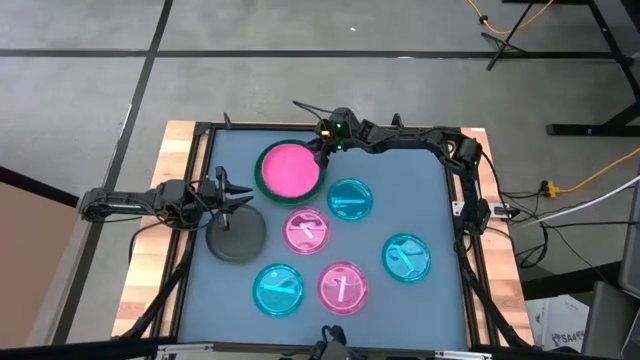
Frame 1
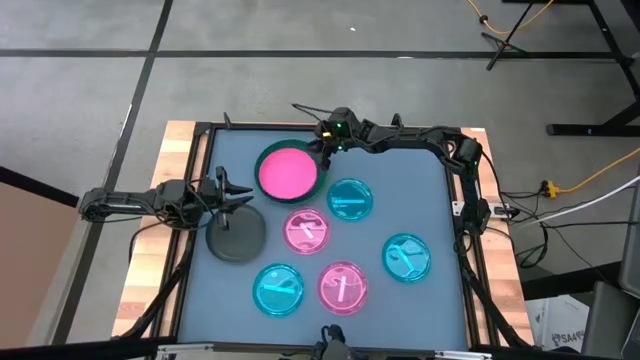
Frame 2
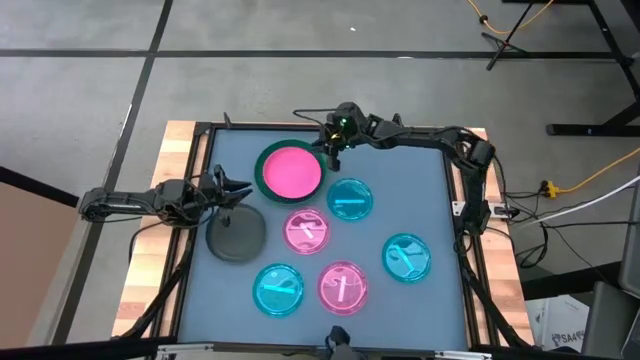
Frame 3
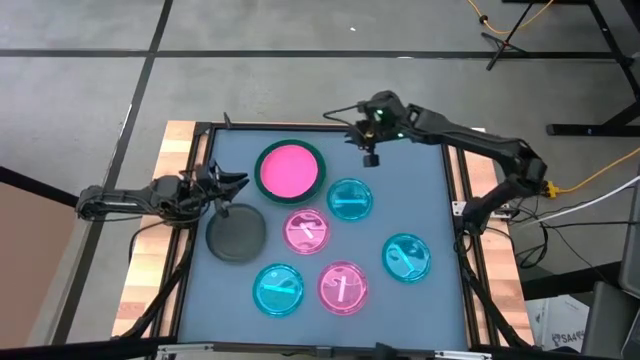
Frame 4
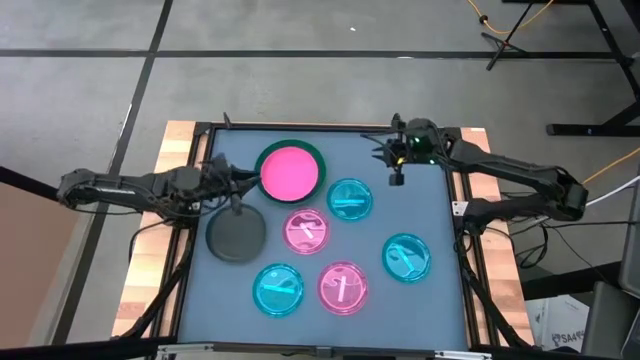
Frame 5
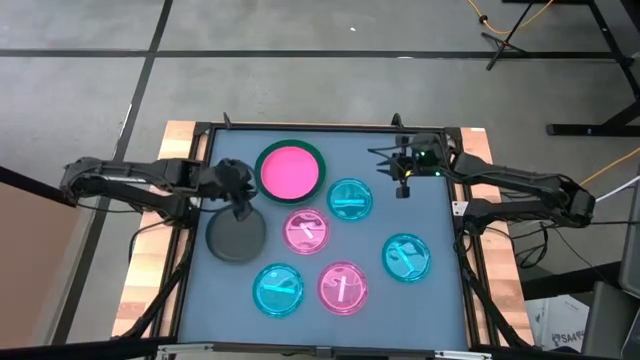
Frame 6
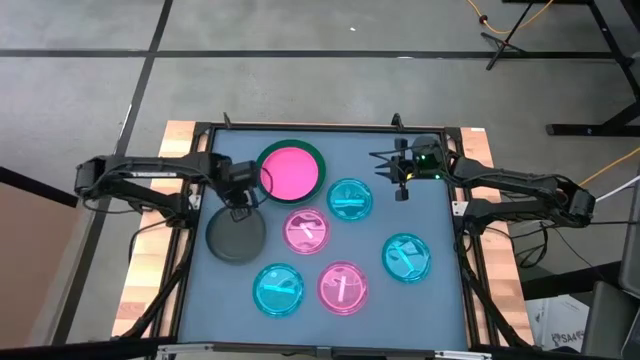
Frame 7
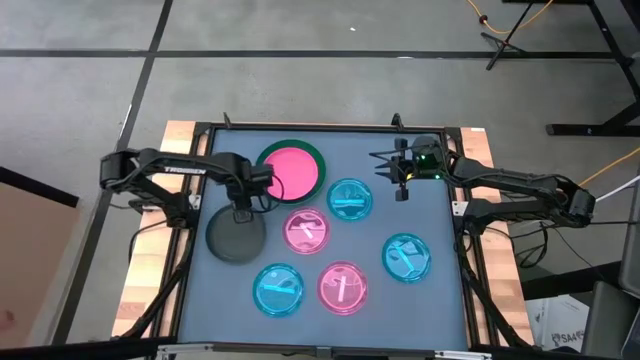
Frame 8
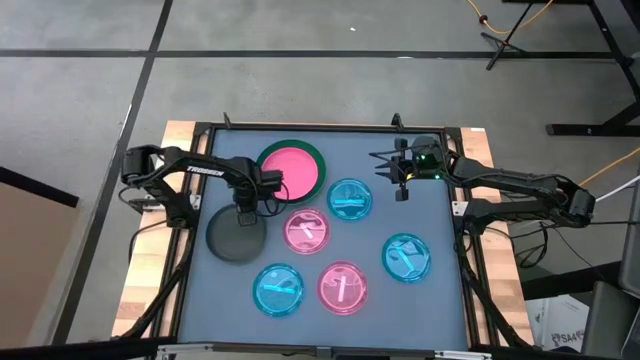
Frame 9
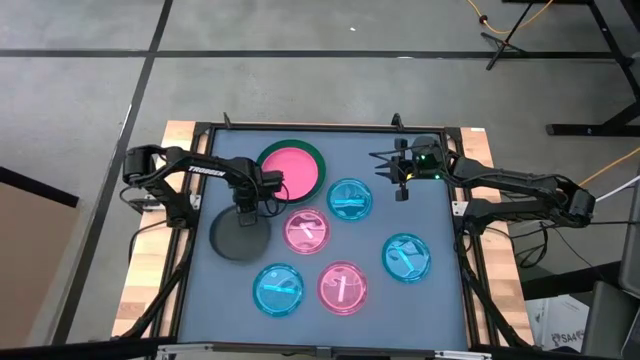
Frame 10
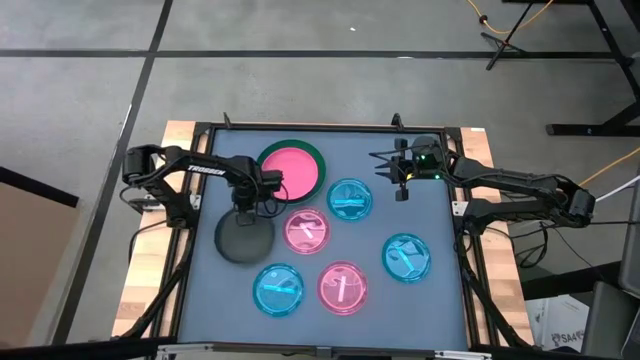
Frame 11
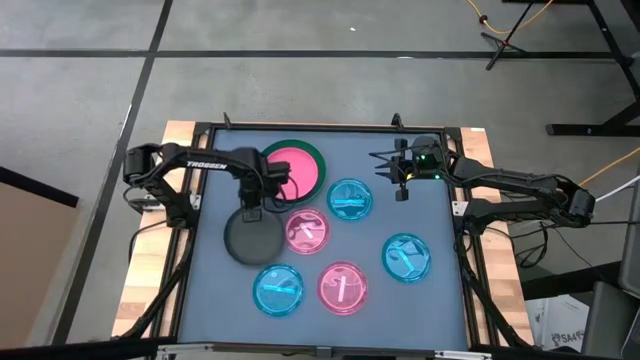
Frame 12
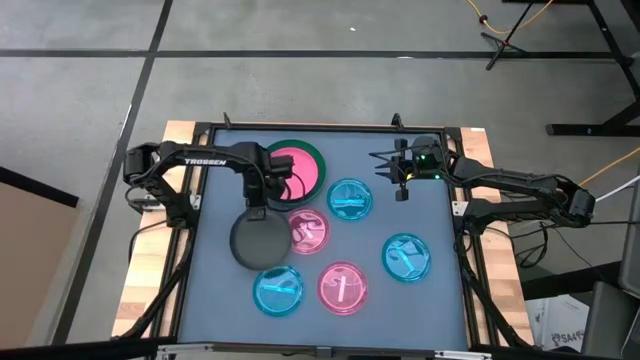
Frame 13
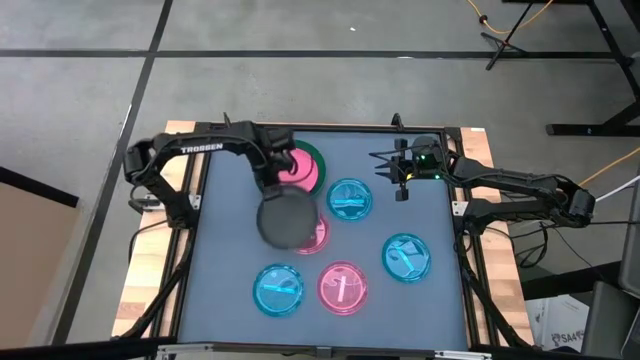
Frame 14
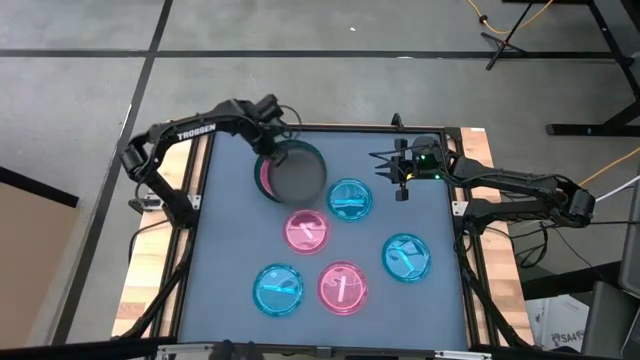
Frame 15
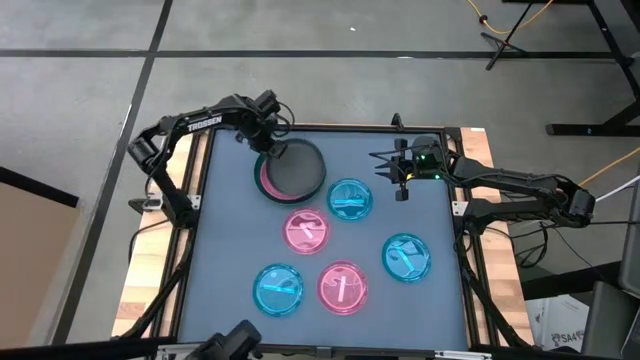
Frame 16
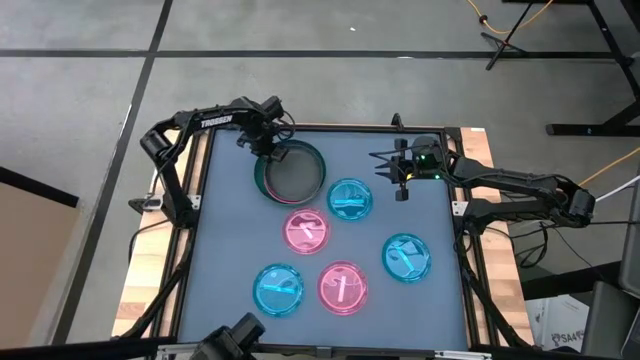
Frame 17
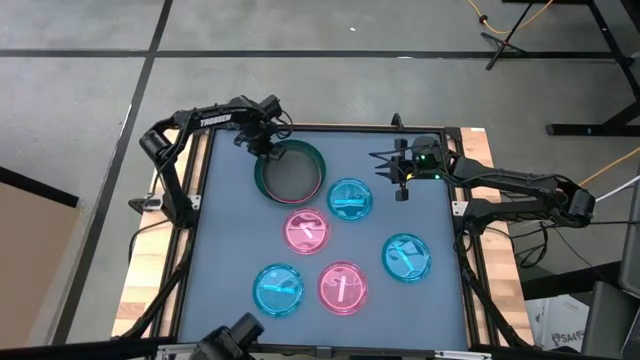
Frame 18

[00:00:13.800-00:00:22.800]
Task: Stack plastic plates
Stack the black plate on the pink plate

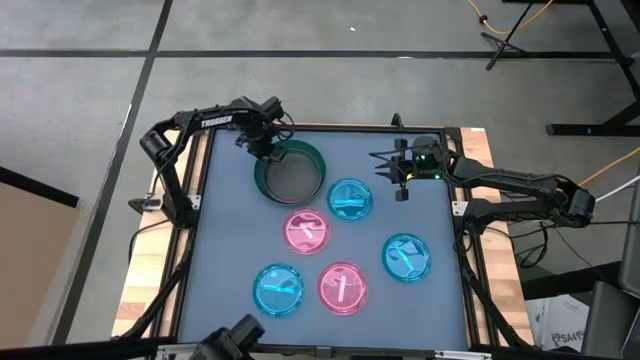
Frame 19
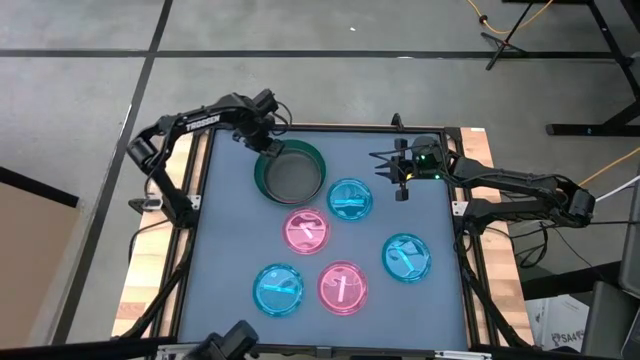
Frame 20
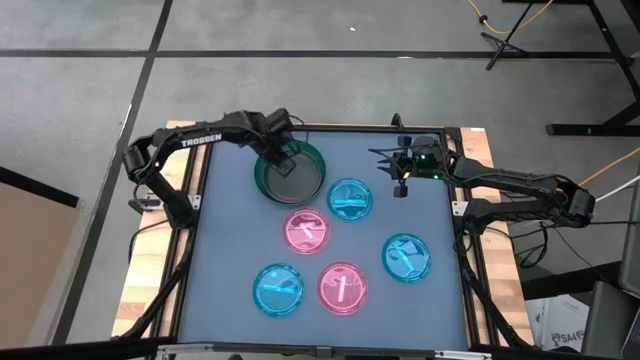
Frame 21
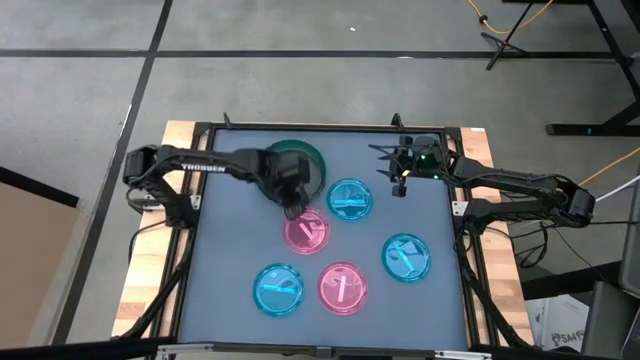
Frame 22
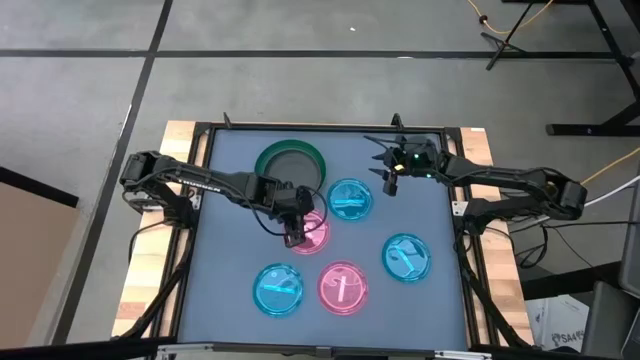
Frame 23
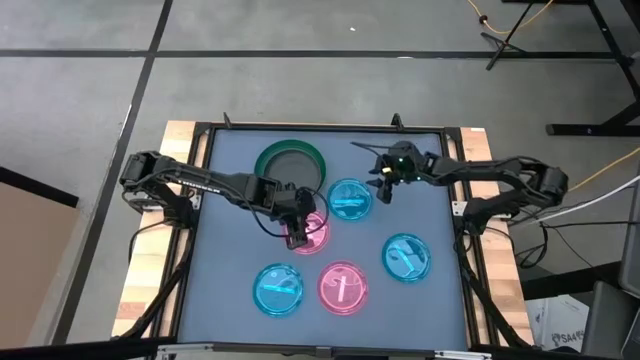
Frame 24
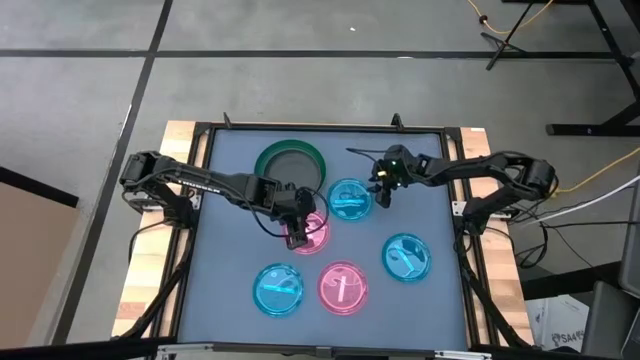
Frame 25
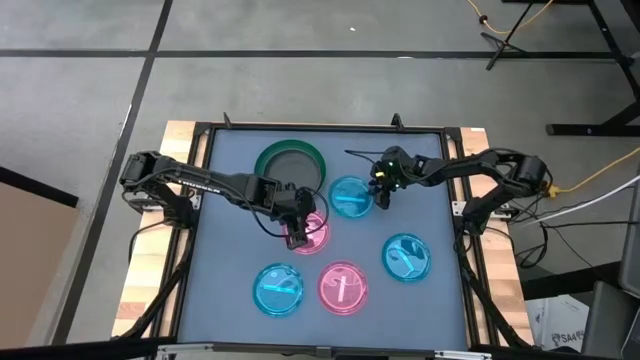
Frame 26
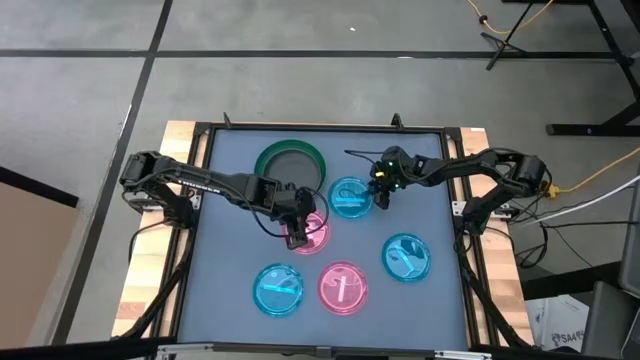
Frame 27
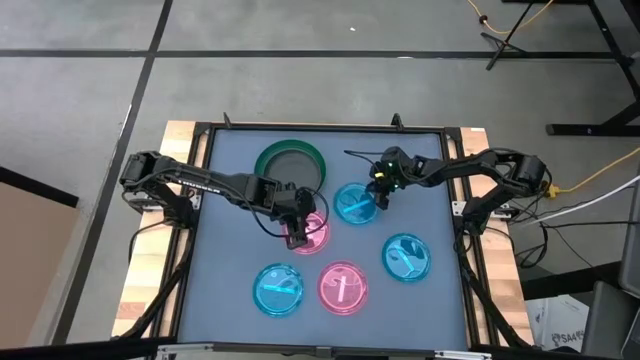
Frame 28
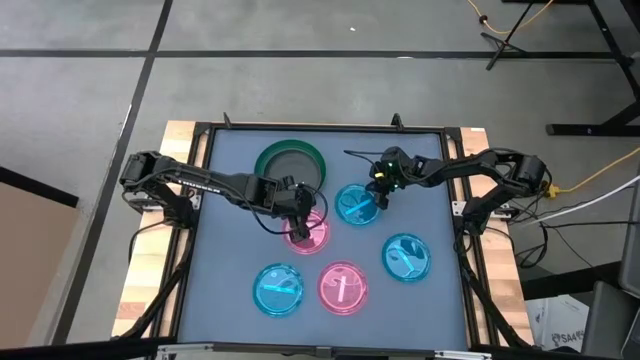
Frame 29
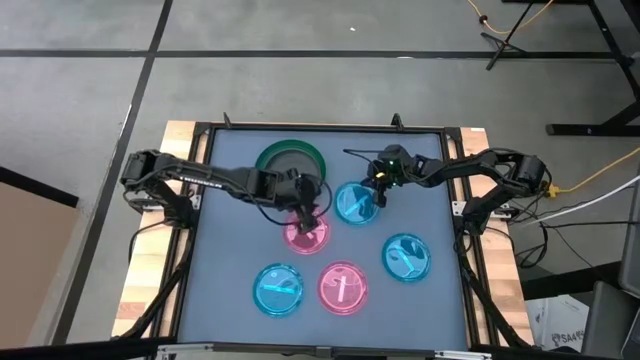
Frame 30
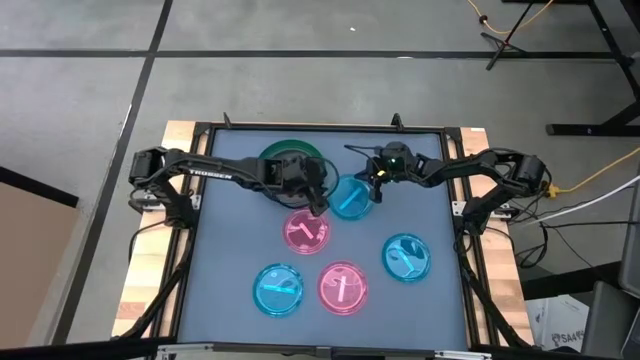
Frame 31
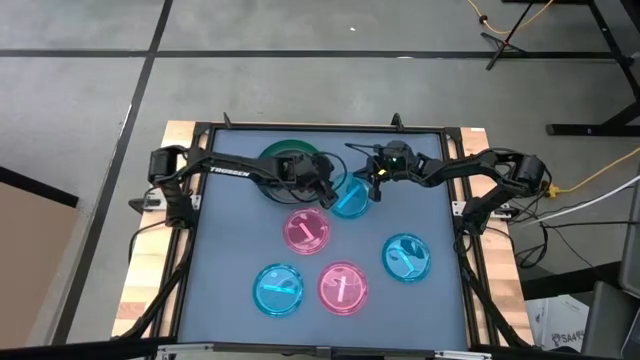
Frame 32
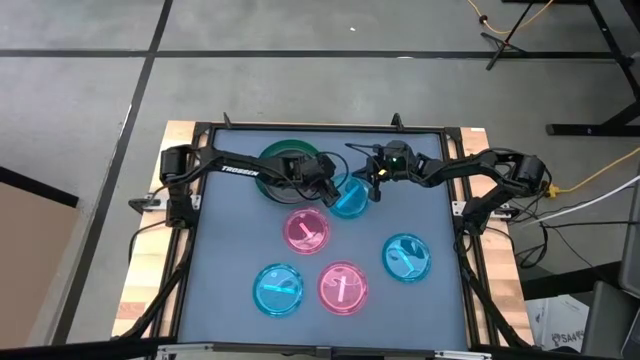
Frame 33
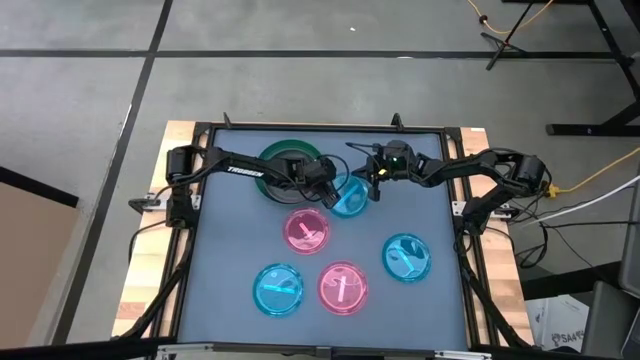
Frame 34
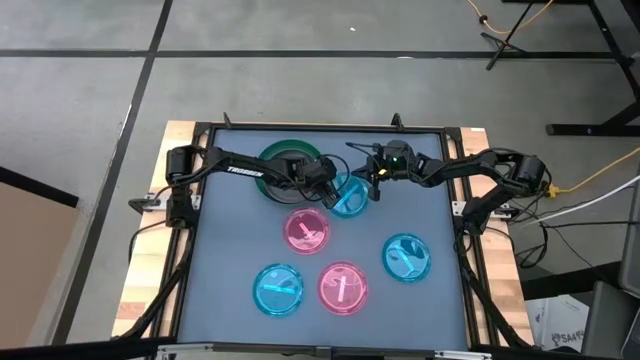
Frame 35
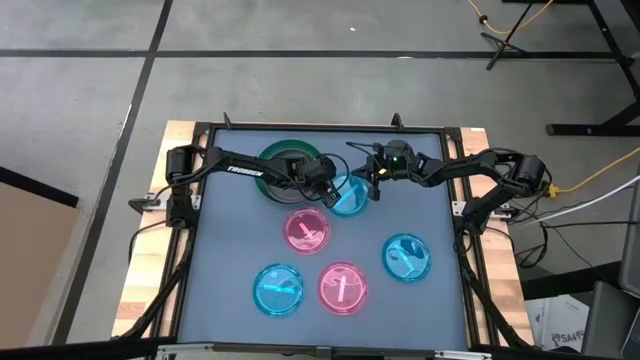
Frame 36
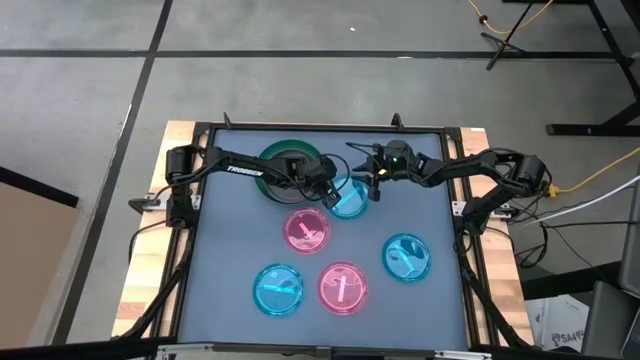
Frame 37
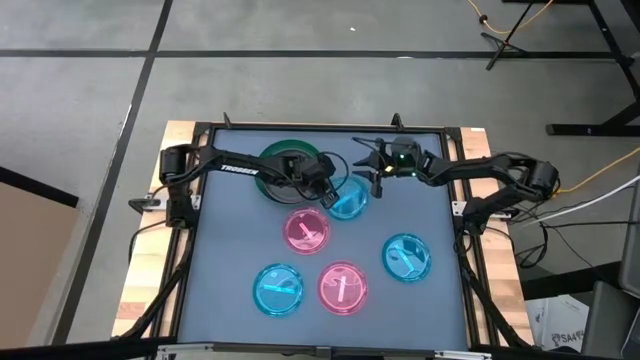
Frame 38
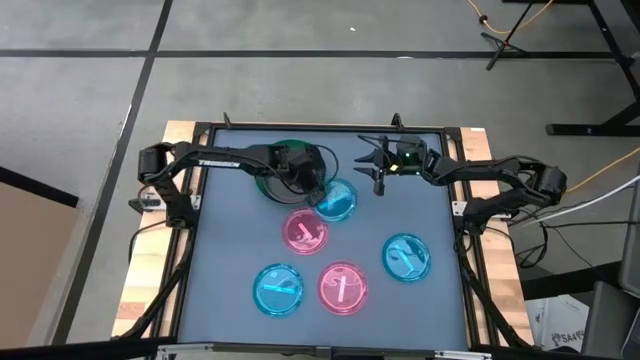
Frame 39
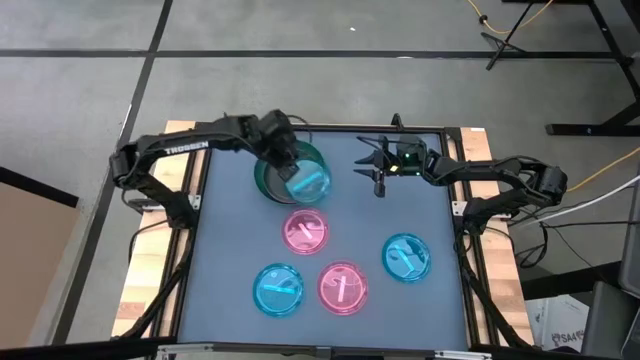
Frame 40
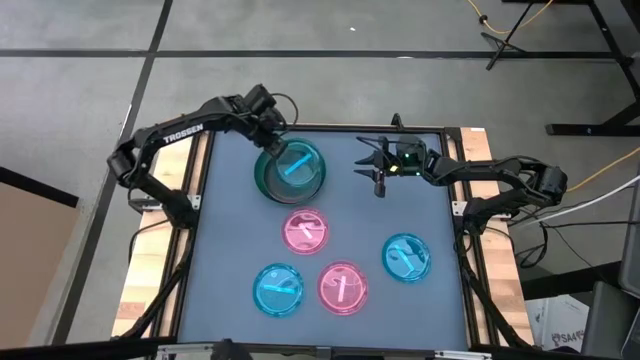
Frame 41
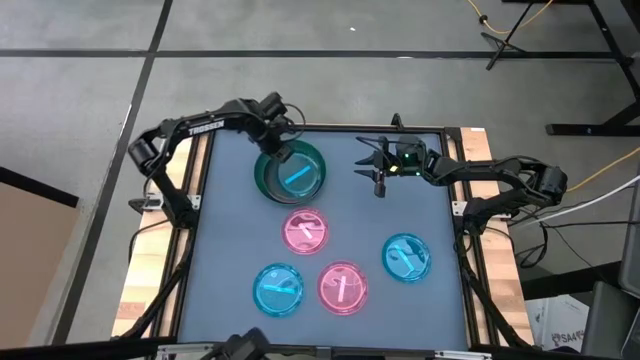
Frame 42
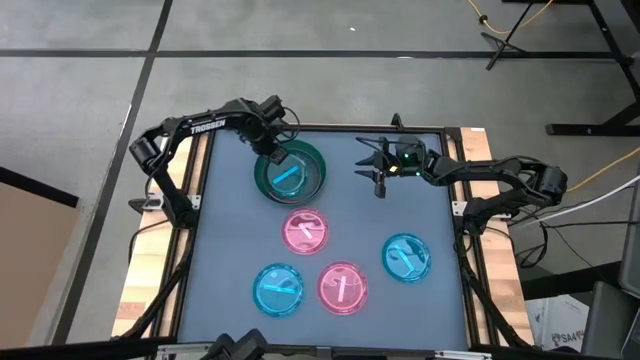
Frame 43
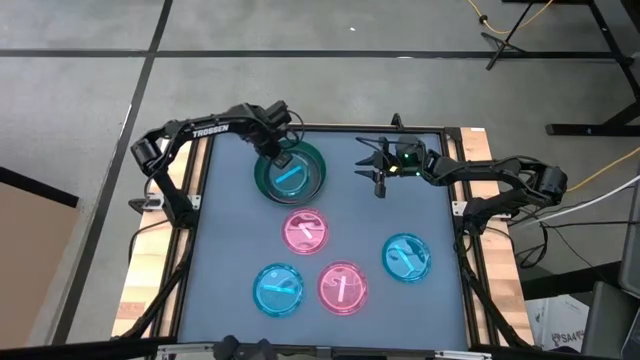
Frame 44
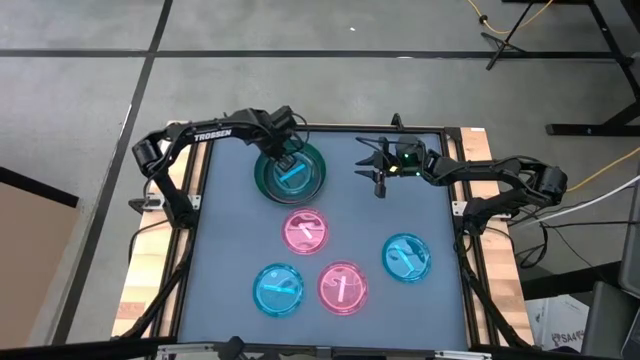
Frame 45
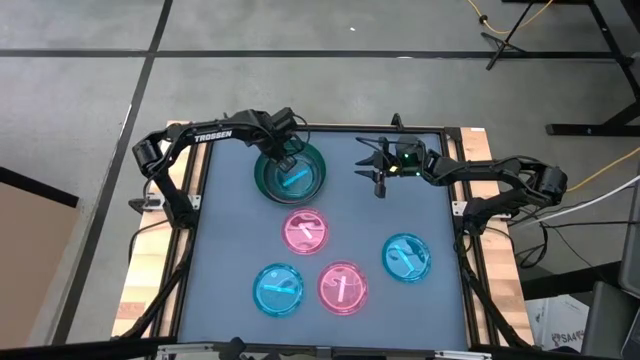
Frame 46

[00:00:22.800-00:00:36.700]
Stack the top blue plate on the black plate
